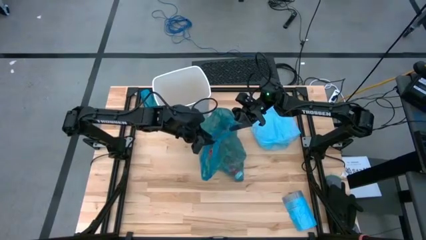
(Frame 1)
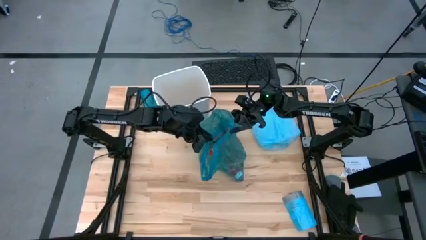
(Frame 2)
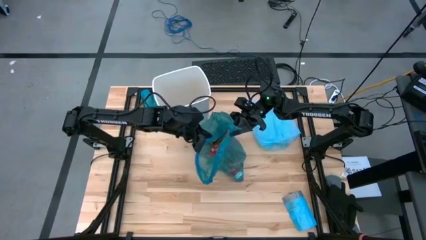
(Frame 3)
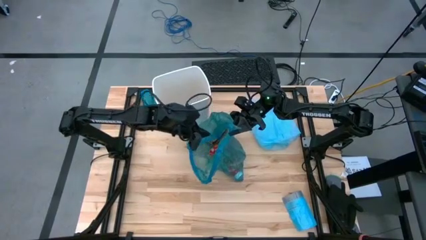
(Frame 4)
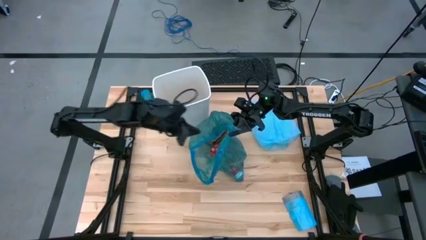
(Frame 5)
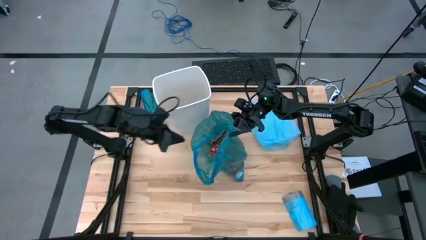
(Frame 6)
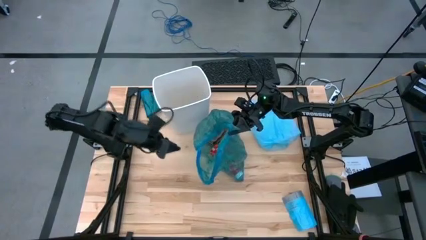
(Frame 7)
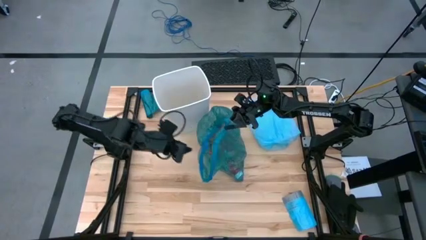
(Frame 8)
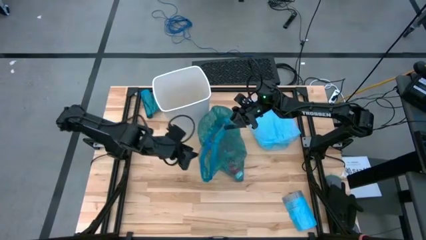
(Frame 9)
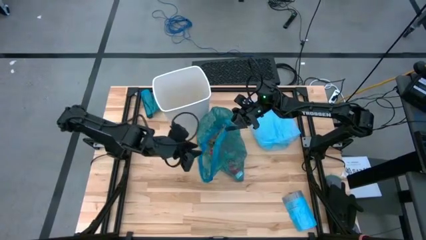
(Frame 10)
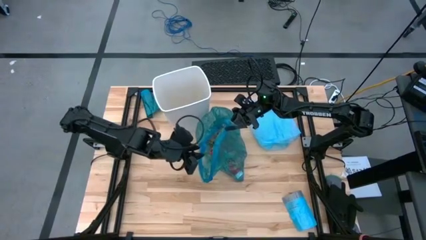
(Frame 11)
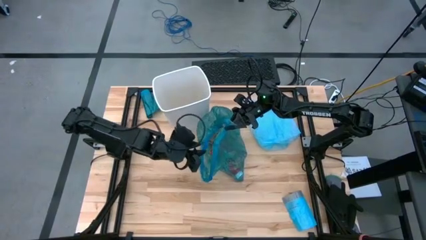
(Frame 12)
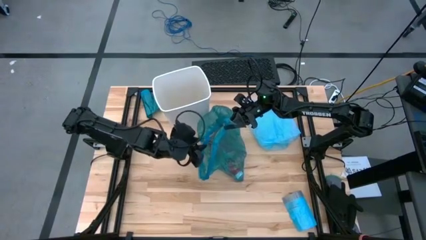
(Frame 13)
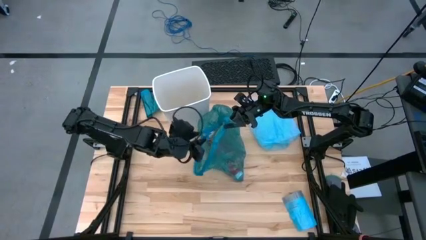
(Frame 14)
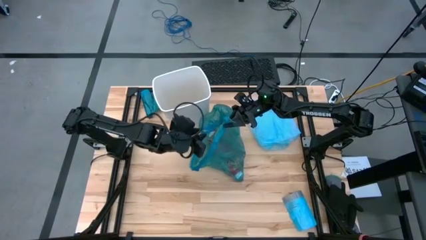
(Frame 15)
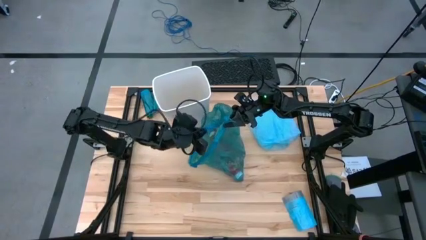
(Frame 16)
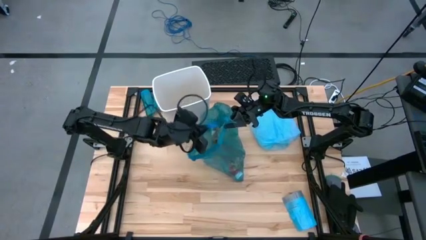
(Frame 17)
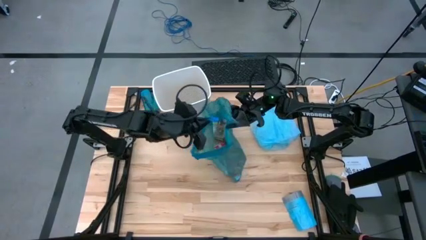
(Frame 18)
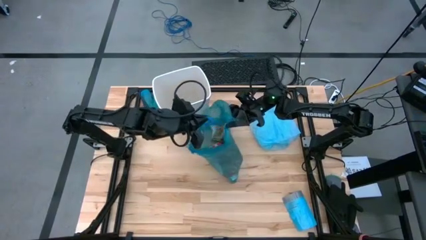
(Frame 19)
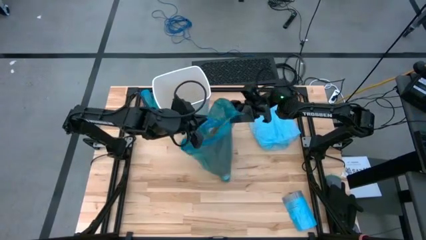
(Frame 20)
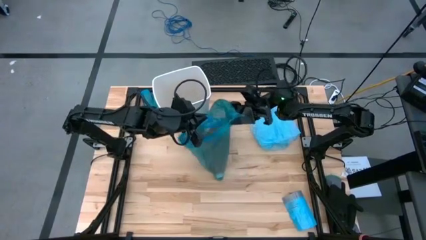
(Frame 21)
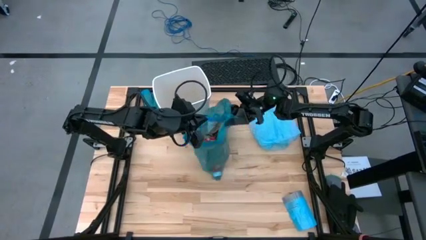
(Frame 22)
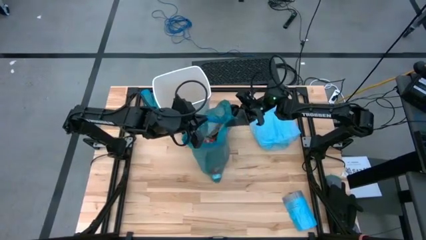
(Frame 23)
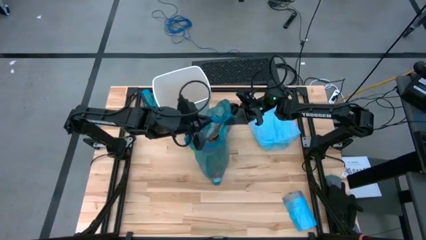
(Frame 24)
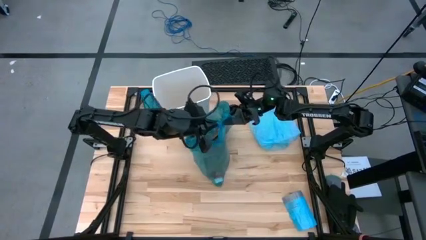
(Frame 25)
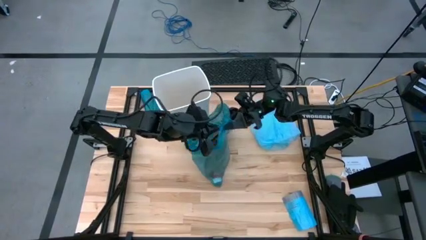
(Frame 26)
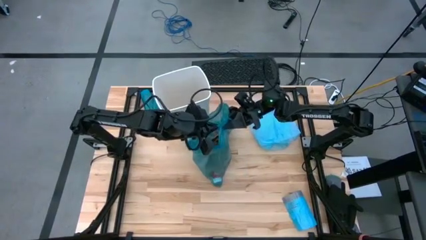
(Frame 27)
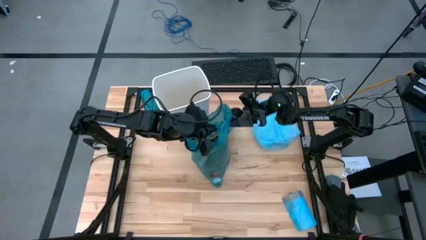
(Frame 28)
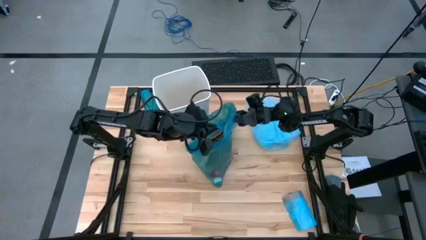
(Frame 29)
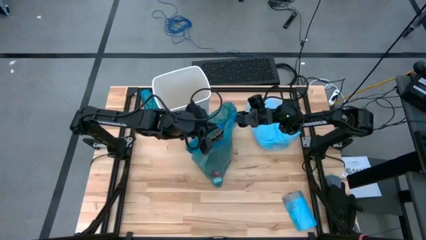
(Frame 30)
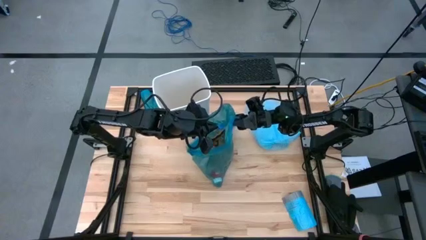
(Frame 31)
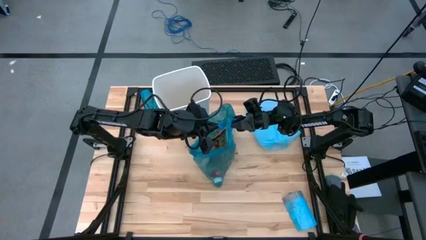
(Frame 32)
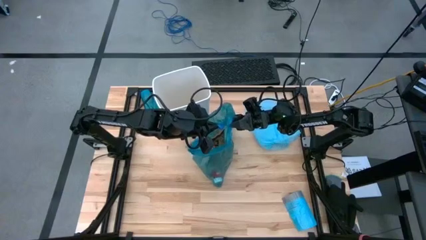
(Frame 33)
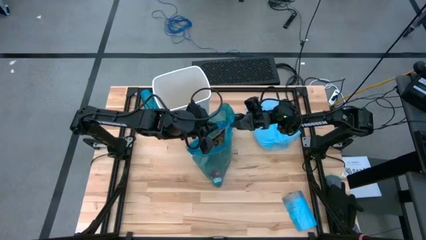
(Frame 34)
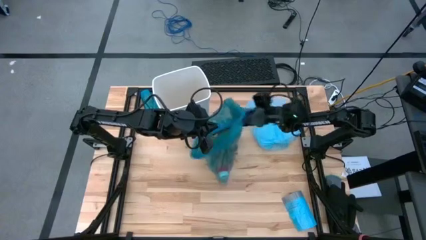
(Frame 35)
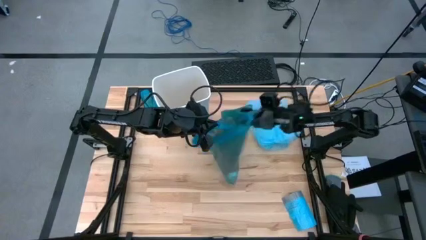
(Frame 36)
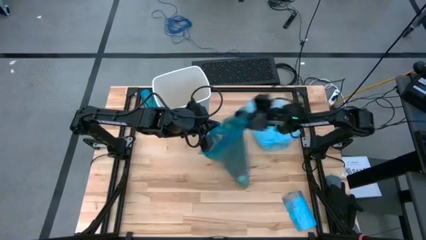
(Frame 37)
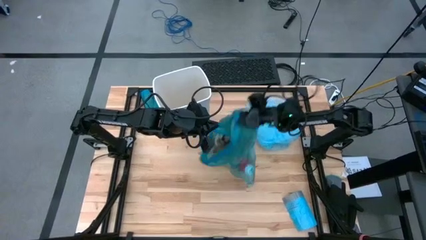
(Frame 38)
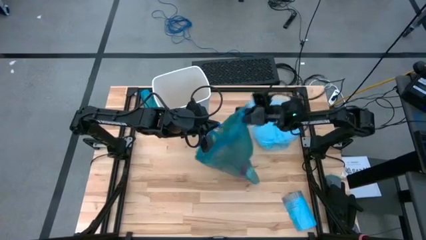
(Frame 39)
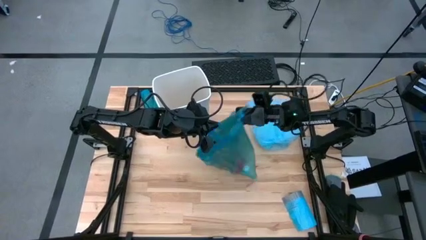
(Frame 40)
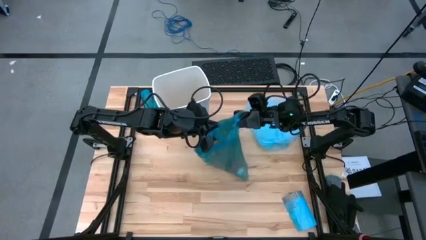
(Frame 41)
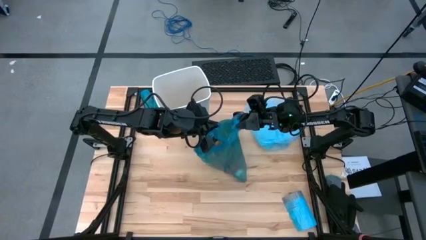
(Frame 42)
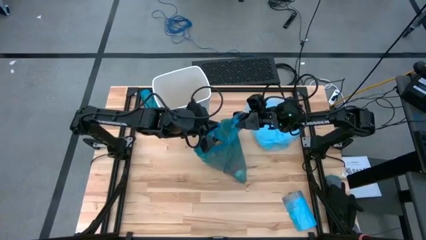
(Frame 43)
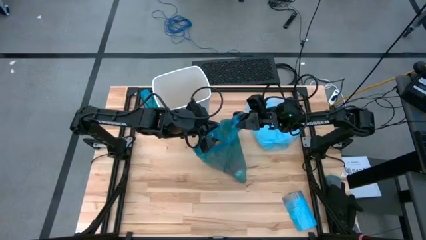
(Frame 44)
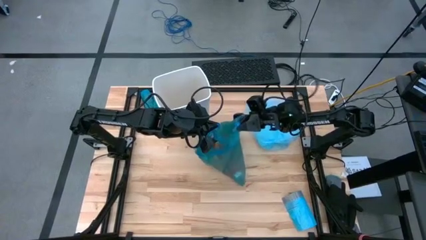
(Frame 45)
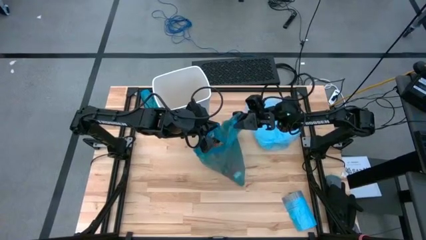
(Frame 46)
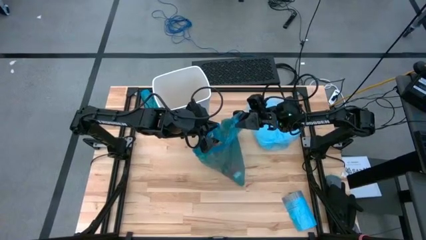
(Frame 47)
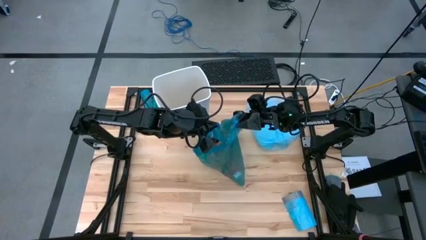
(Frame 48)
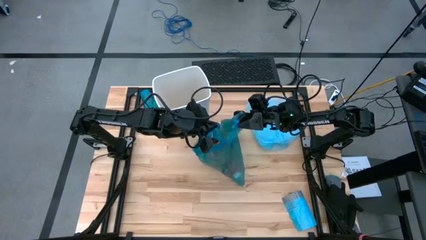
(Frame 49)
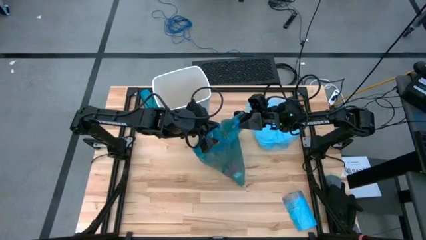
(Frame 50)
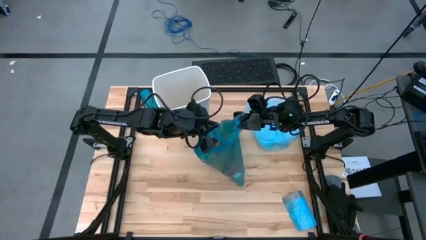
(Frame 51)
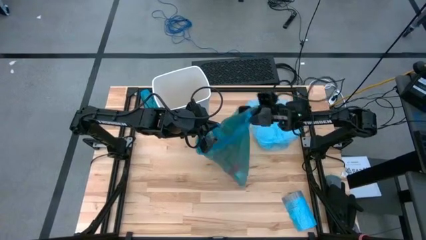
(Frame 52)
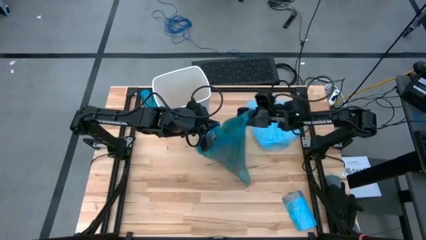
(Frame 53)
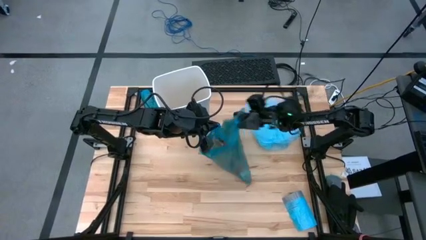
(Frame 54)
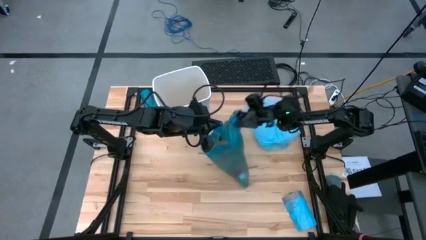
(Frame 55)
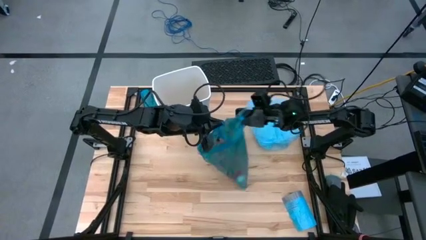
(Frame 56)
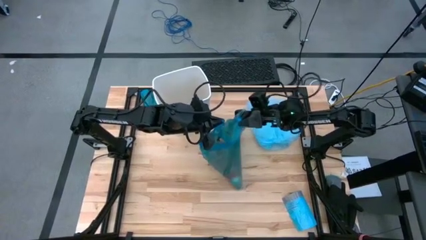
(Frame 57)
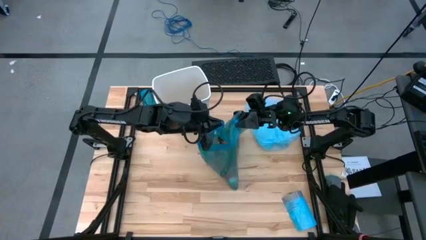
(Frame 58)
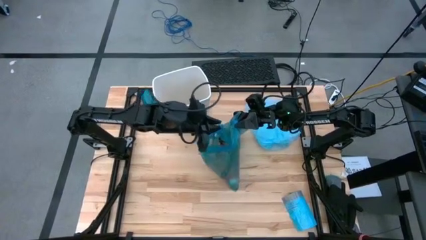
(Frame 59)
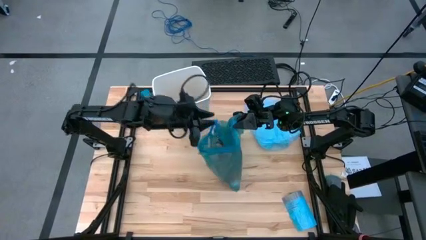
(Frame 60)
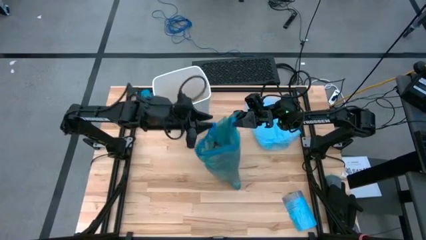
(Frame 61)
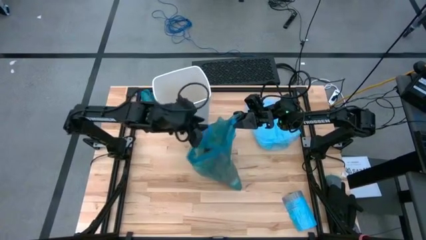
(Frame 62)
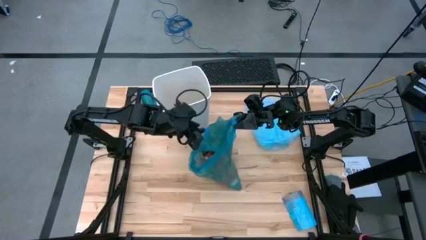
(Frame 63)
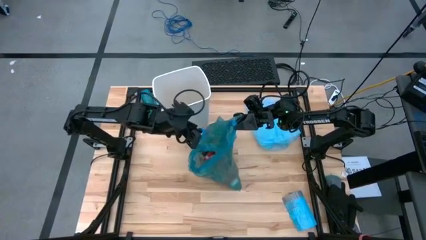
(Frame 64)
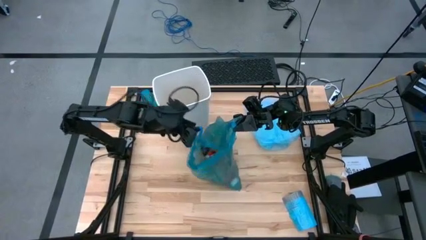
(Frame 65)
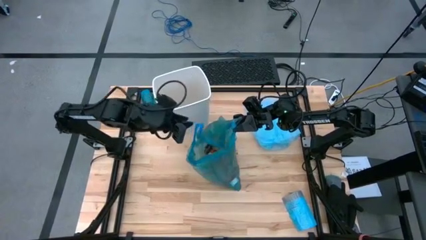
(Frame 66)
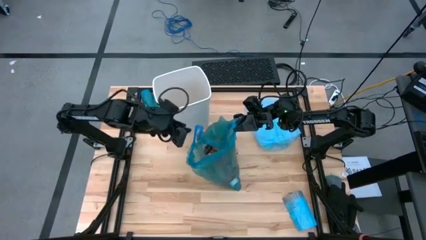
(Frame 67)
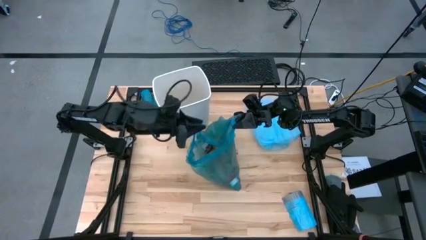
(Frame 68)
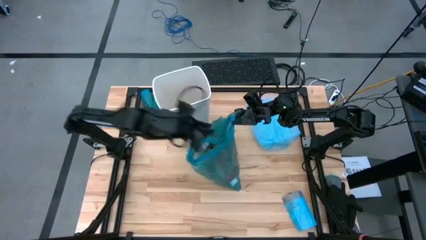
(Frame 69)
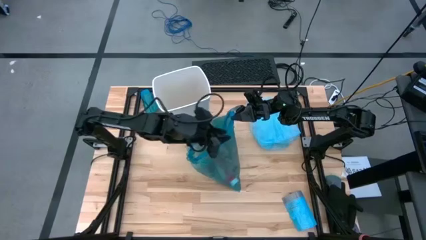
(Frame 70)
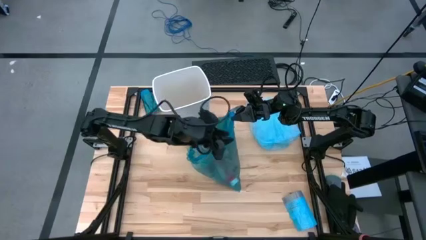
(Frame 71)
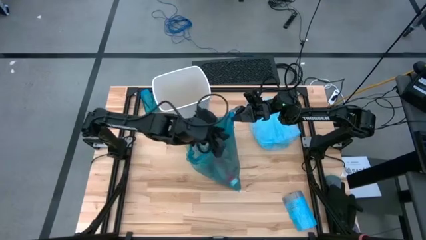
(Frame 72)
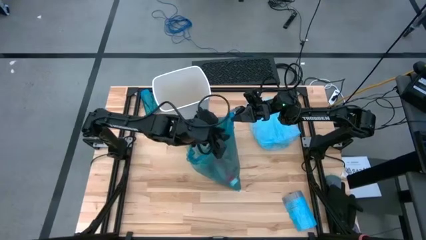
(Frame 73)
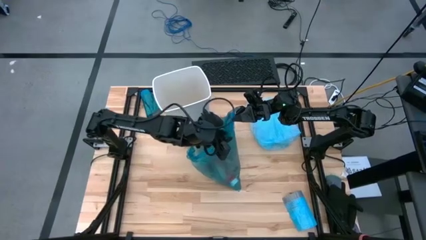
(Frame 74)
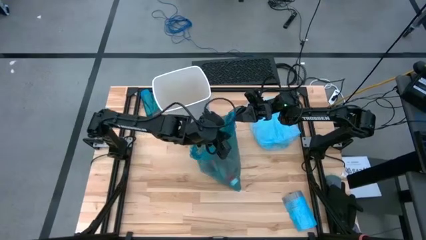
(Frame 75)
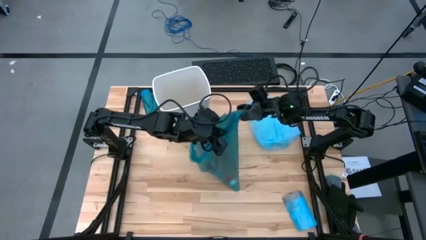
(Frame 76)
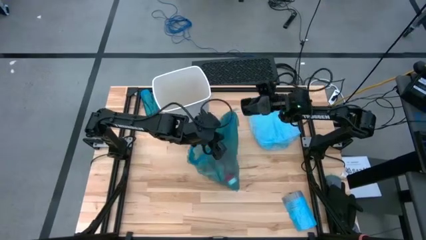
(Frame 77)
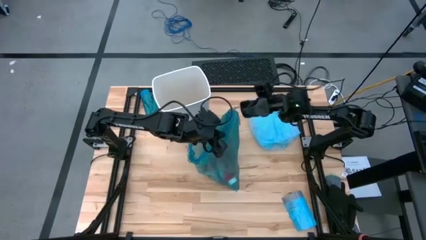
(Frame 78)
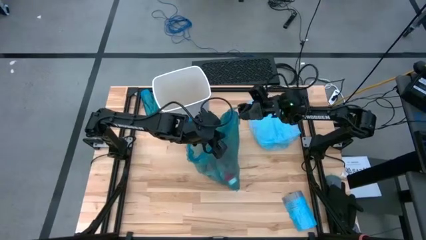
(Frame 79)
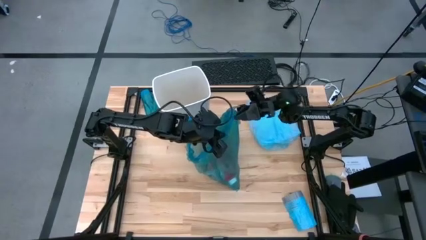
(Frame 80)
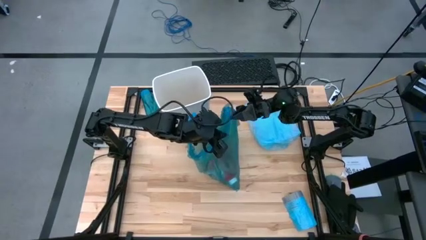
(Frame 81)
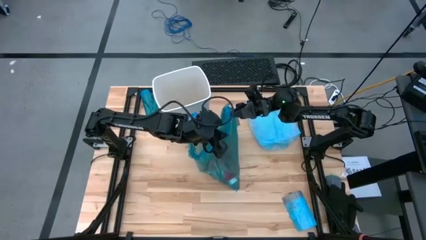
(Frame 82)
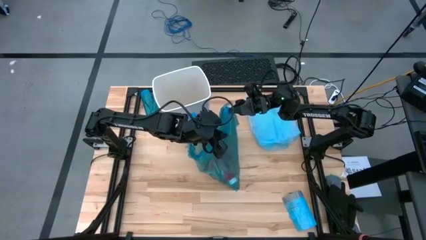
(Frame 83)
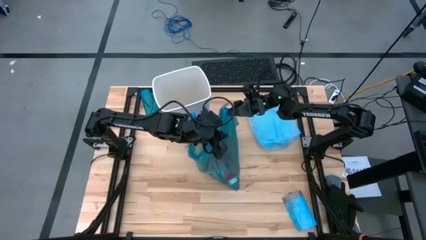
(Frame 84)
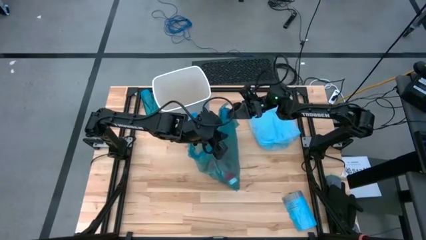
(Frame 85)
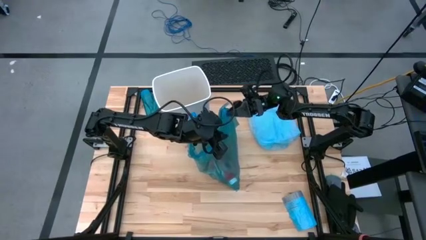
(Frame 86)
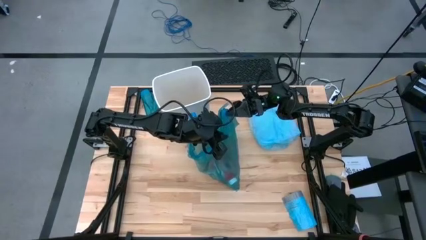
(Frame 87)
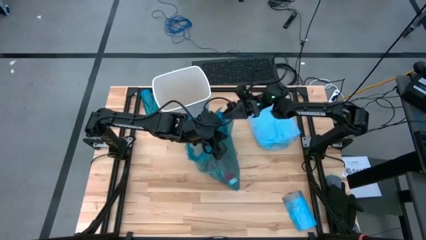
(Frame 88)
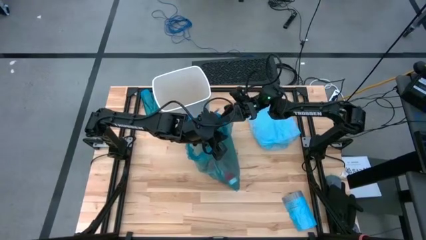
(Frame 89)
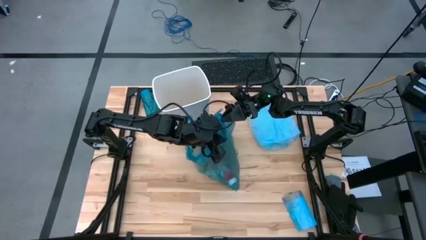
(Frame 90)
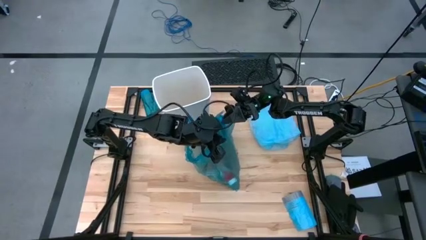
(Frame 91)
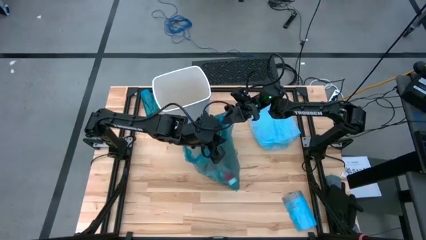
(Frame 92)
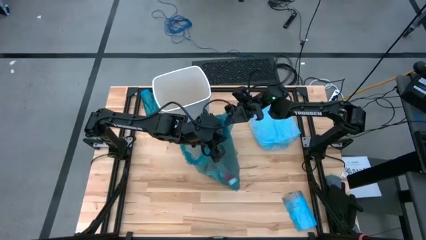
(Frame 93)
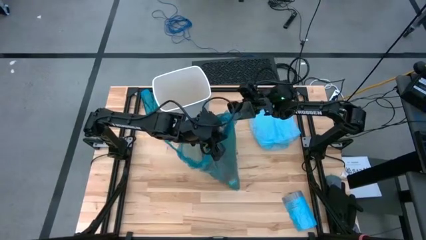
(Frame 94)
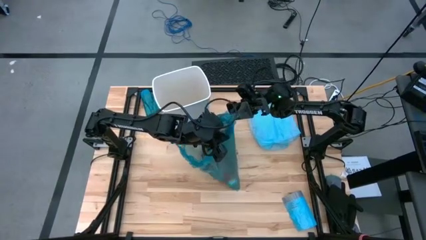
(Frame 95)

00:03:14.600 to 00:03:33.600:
Task: place trash/remove bag and relplace
Close the blue trash bag
